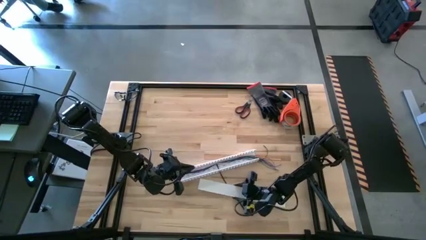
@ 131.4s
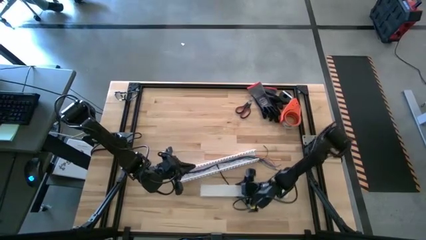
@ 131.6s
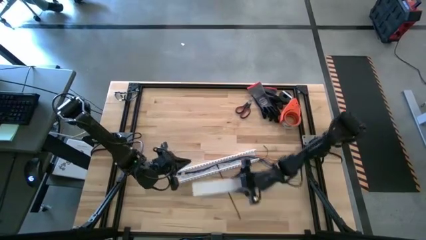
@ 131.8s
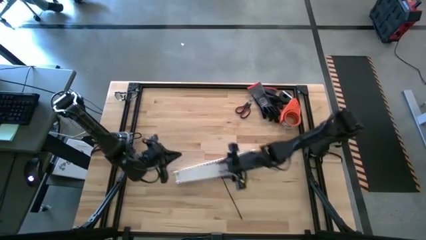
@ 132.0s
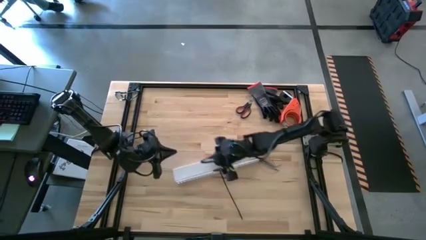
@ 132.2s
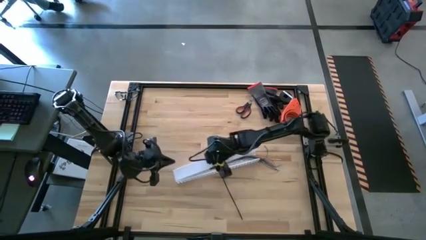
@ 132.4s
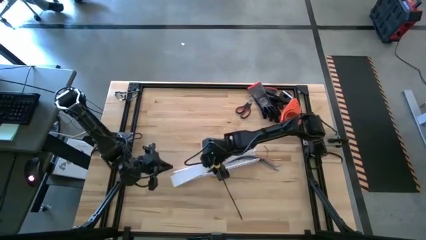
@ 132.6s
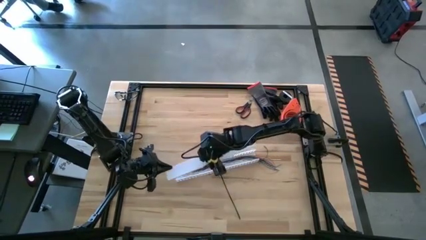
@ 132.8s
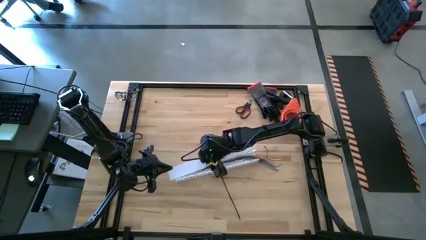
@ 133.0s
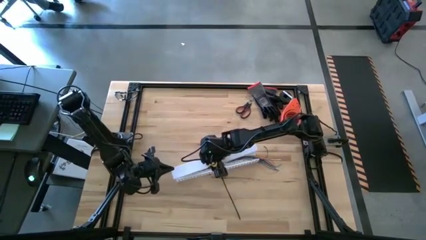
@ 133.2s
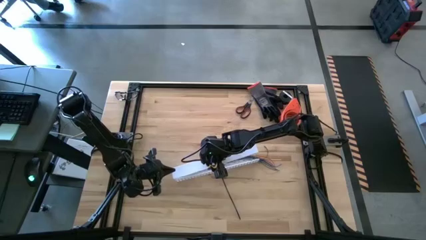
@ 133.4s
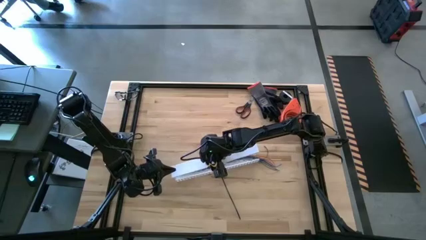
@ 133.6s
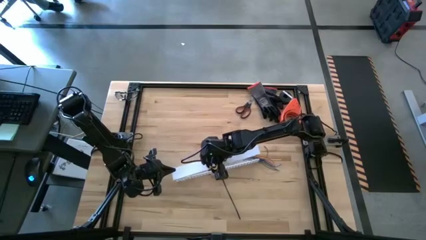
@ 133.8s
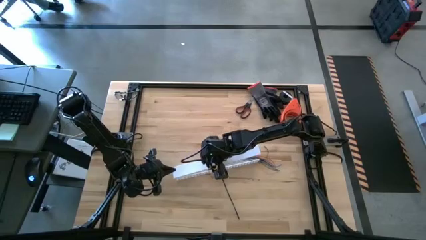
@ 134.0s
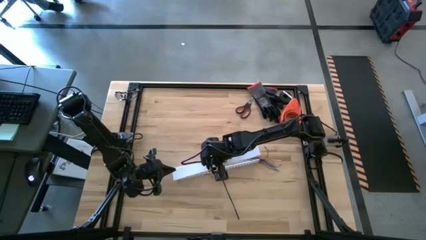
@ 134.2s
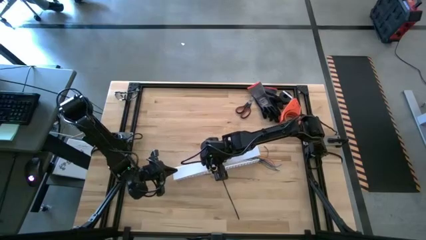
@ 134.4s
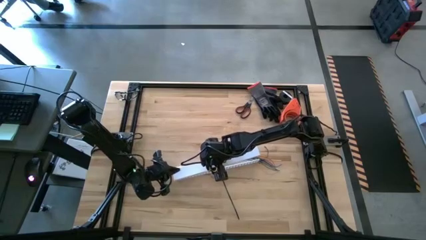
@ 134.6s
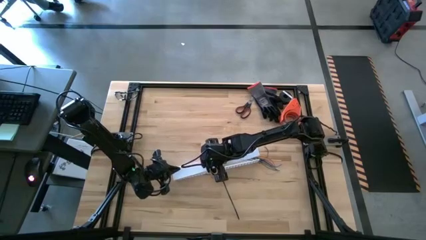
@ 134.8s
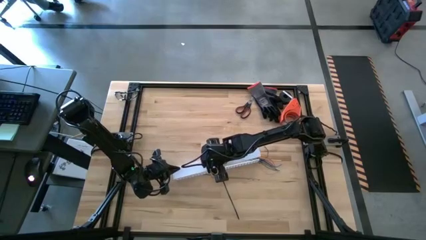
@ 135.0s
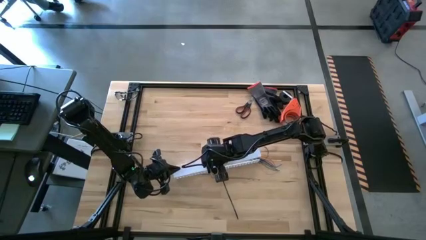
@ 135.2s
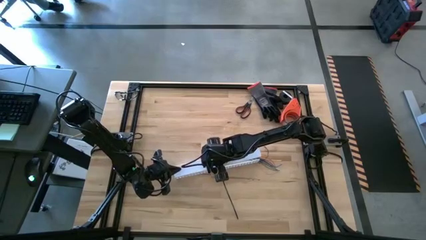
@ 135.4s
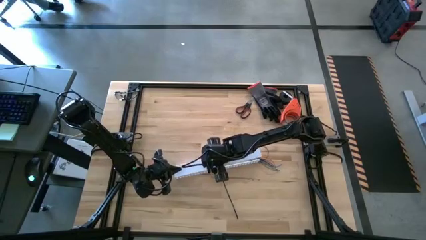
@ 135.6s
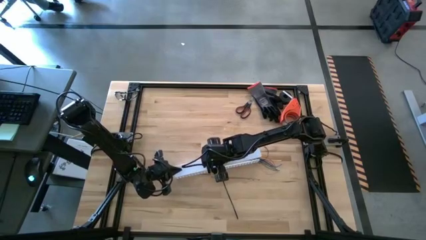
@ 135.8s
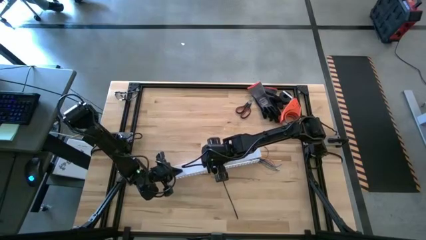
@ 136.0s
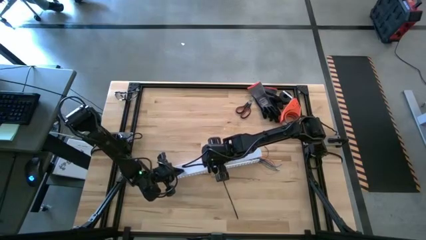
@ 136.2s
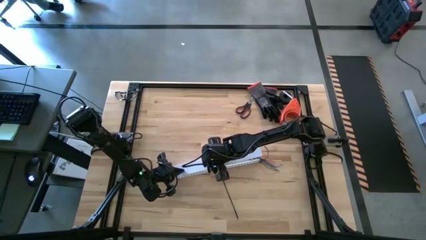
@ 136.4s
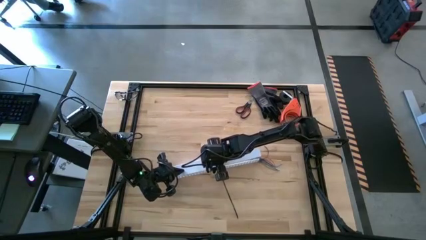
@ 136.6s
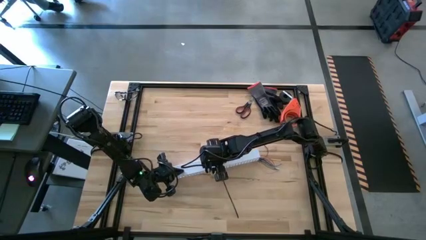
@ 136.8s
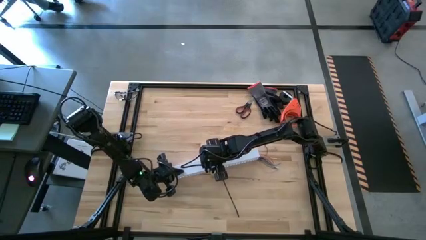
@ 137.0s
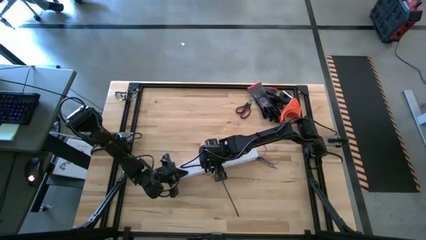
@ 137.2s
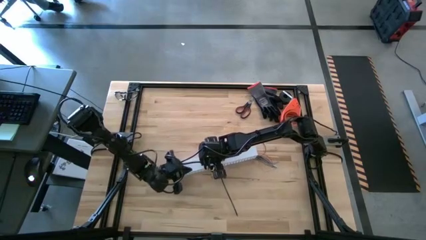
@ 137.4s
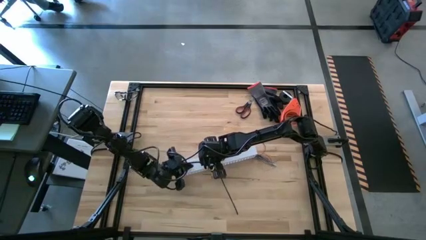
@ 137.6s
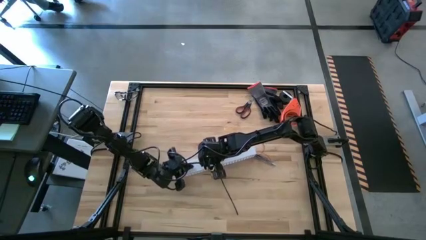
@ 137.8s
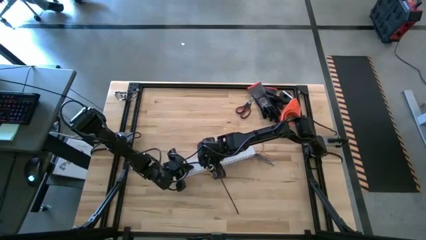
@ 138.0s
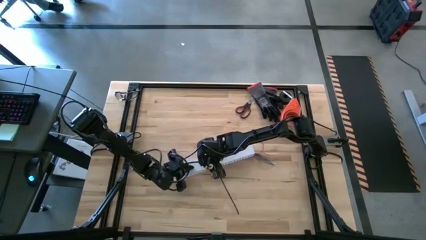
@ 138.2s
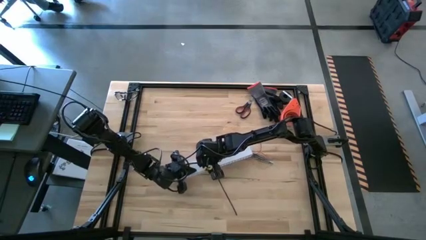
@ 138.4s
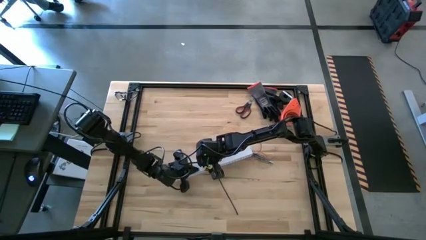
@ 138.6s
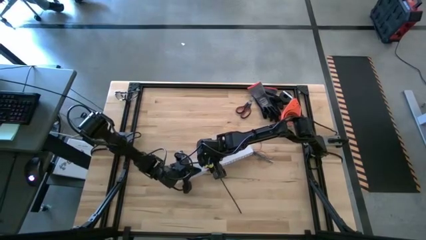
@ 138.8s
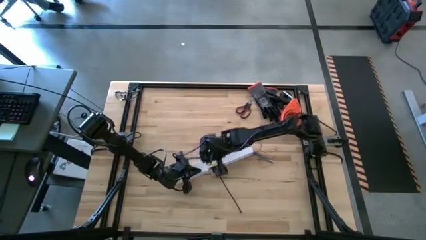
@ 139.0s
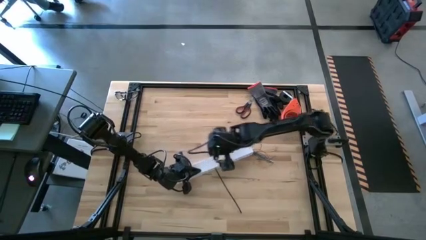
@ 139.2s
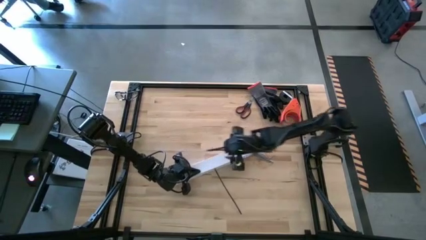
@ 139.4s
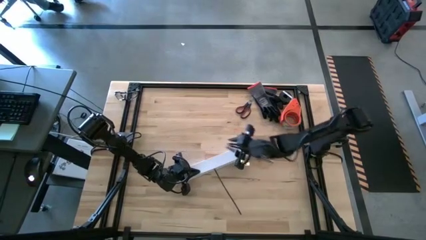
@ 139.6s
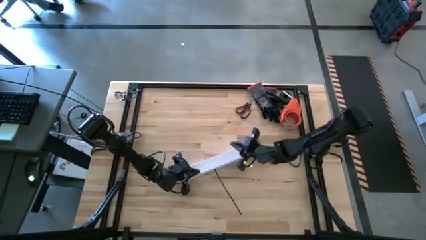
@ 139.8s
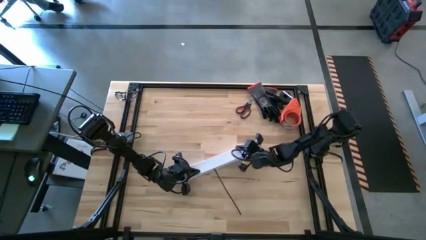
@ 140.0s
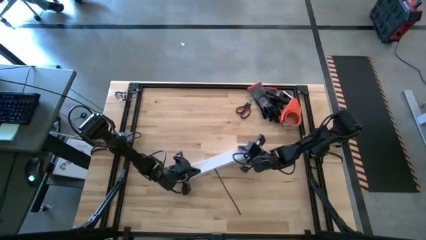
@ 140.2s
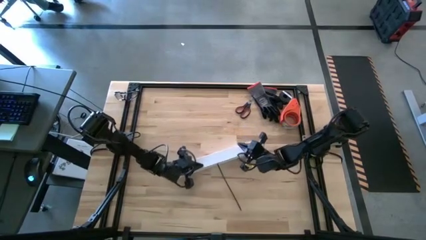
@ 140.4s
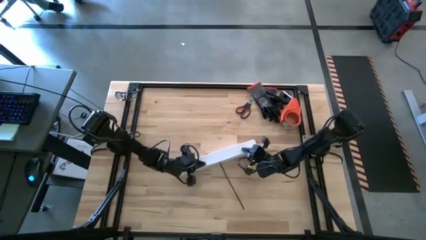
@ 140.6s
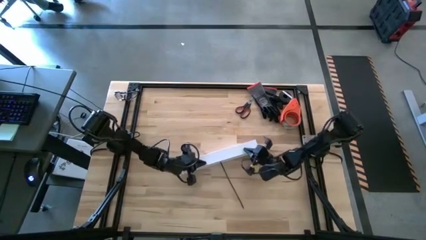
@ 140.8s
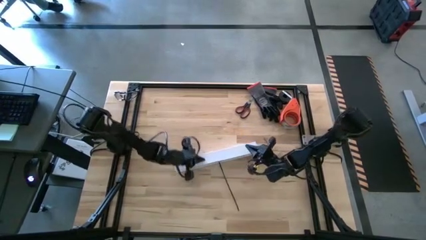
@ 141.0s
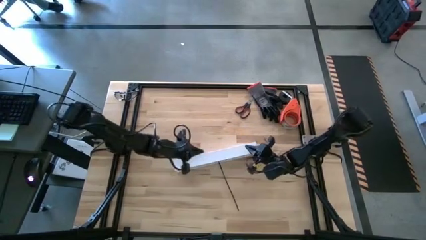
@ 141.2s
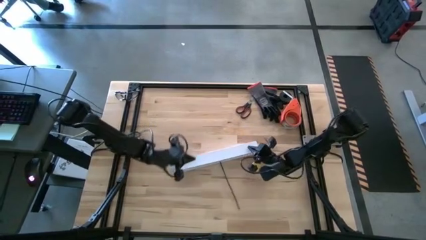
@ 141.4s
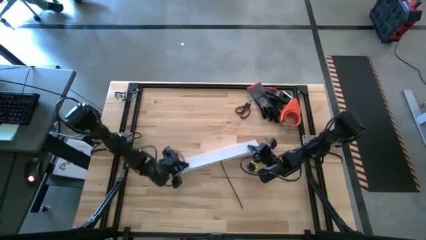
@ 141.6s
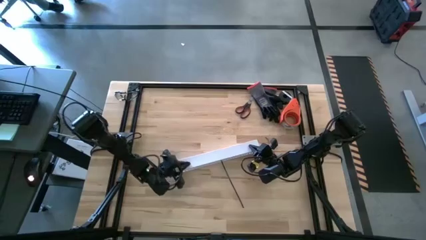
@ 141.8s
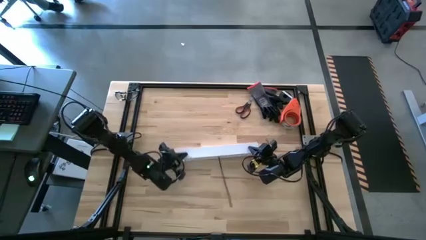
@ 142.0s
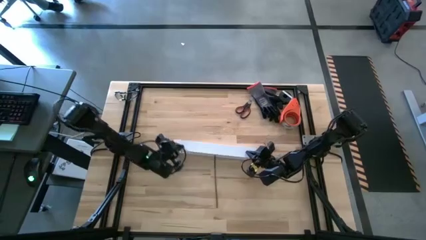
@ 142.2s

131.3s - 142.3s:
Task: Ziptie cables
Close the white cable duct

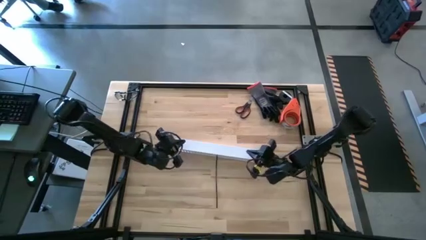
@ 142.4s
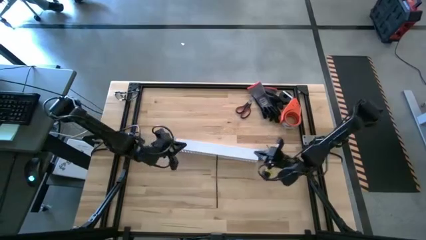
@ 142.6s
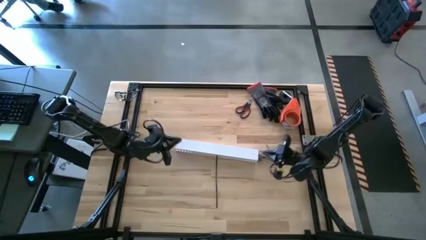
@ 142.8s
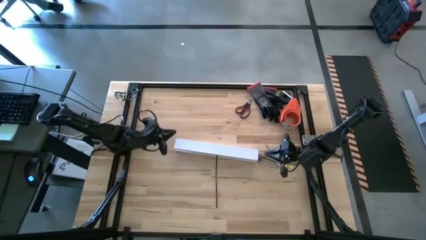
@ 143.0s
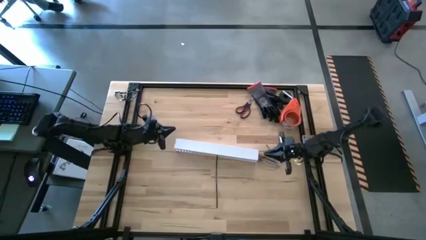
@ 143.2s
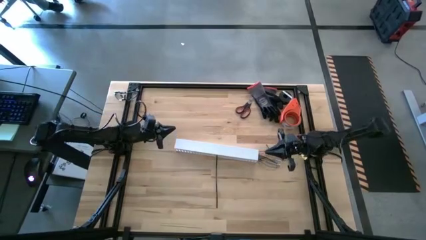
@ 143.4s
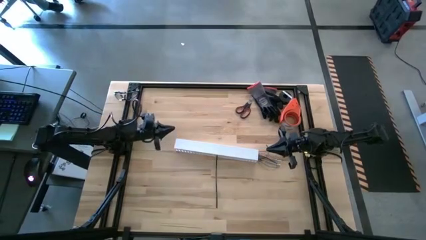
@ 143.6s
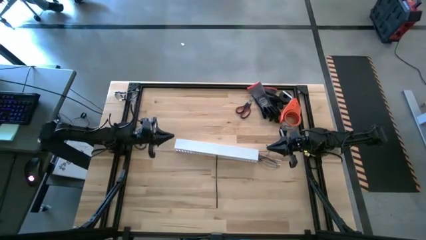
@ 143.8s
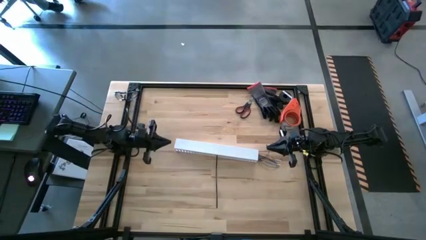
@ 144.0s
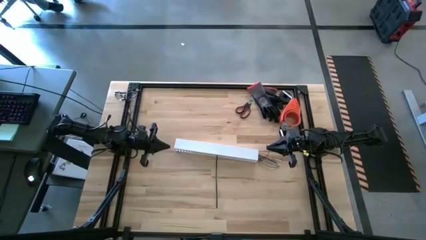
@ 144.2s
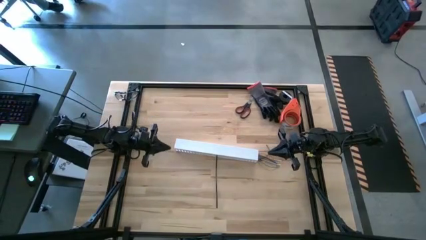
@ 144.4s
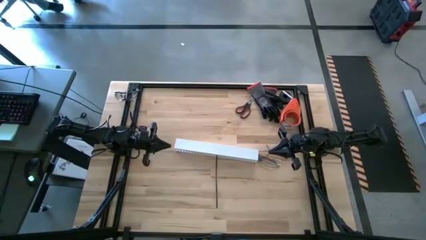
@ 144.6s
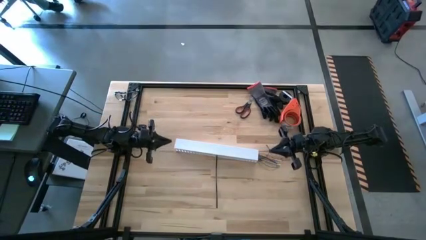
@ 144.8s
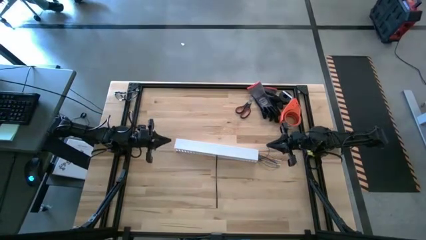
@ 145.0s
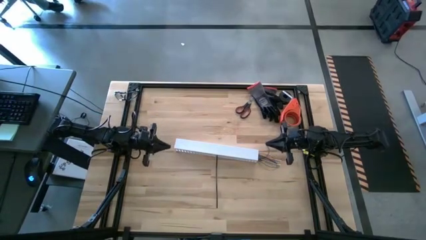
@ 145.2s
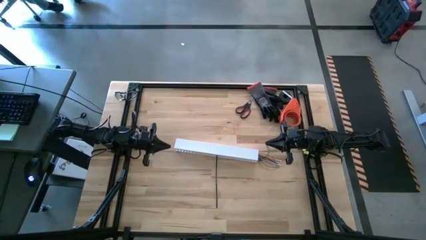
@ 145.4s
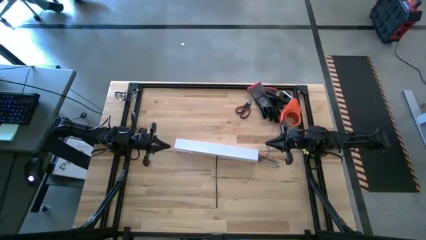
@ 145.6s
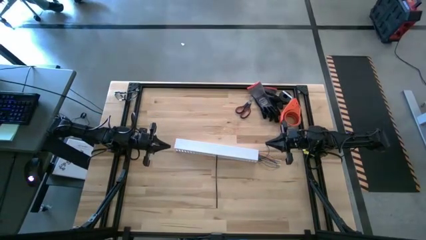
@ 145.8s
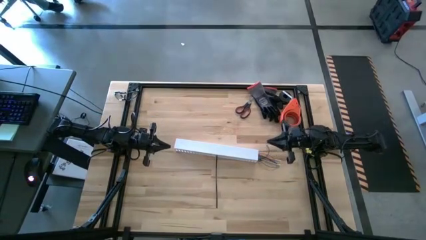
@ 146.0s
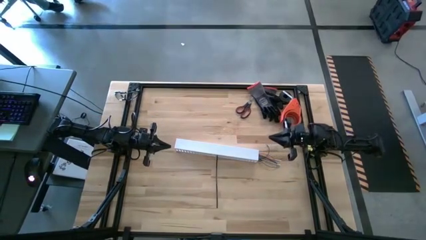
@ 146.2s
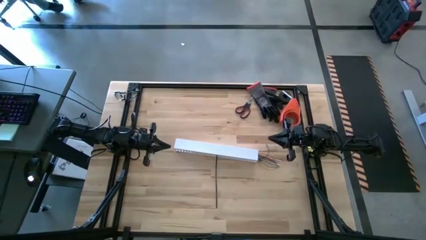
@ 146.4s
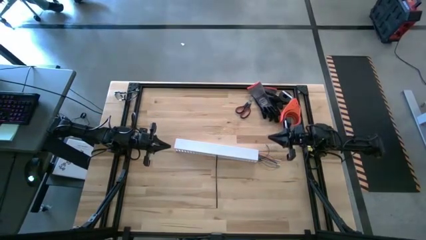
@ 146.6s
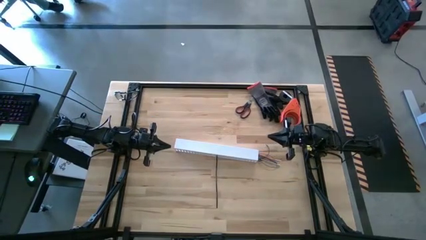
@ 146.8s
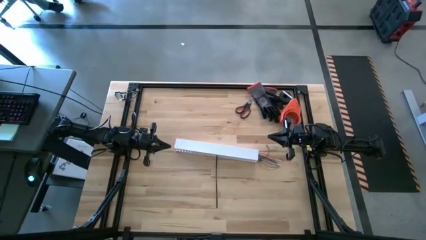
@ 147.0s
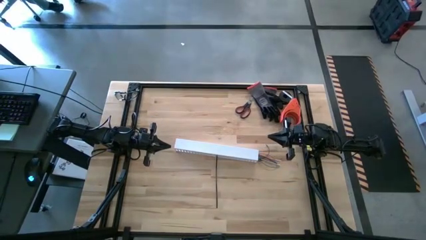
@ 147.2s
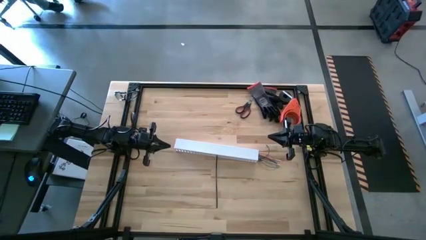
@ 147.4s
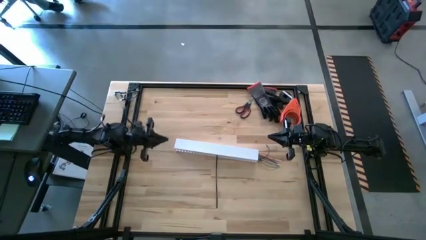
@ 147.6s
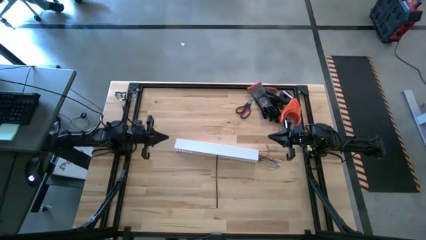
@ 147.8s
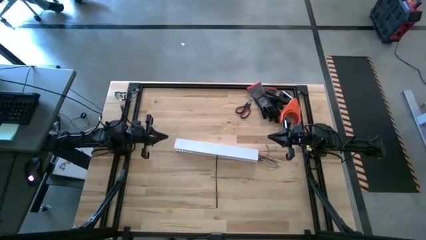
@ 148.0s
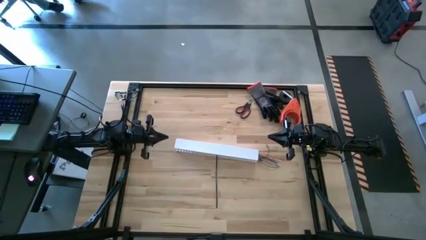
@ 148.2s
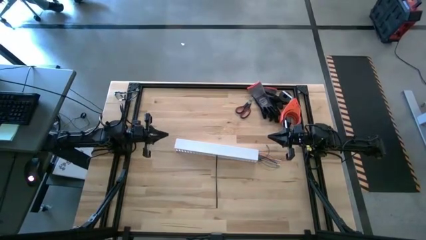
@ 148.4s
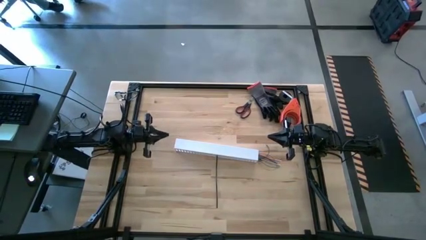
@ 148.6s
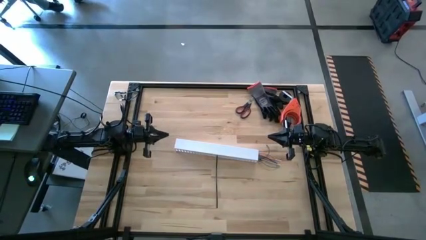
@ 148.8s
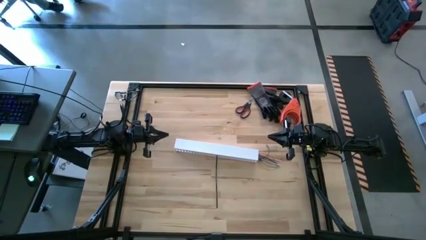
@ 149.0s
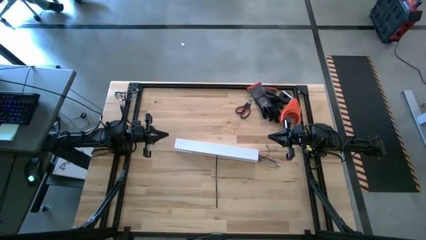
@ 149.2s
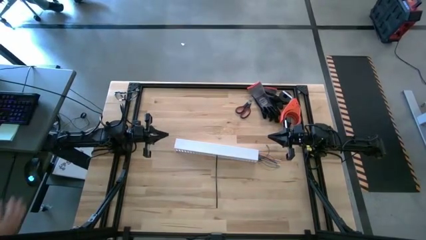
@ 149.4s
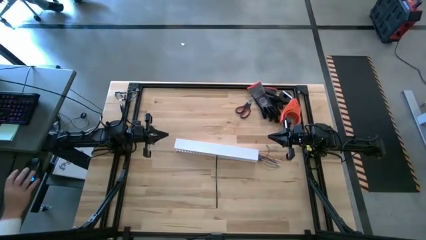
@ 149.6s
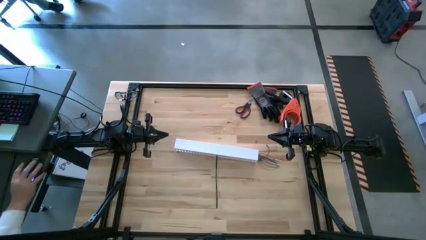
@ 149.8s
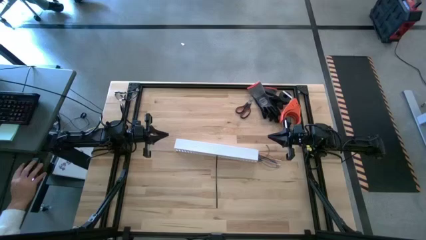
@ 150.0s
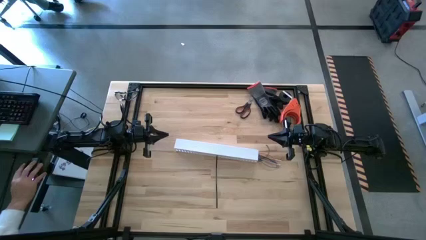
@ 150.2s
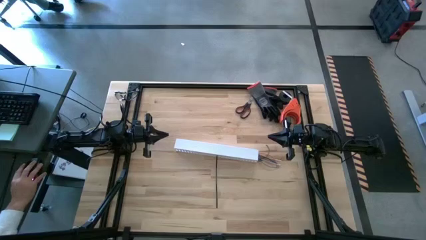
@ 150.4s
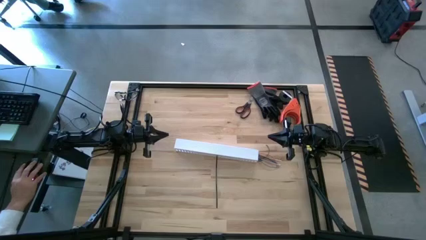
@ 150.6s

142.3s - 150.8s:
Return to Home Position
